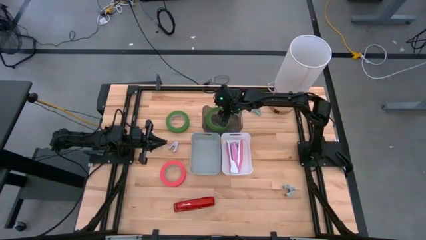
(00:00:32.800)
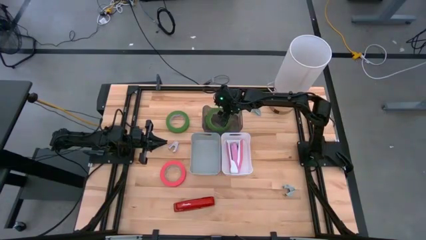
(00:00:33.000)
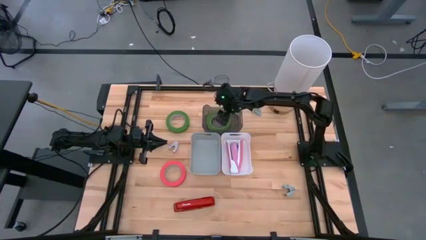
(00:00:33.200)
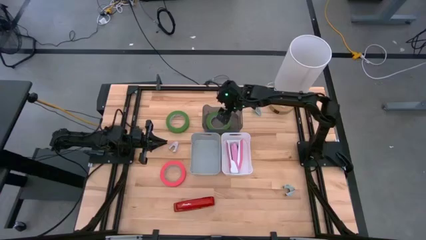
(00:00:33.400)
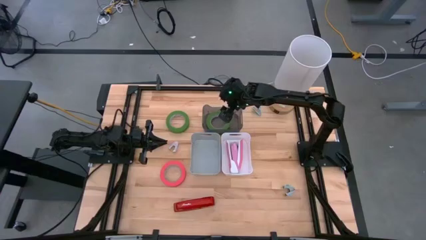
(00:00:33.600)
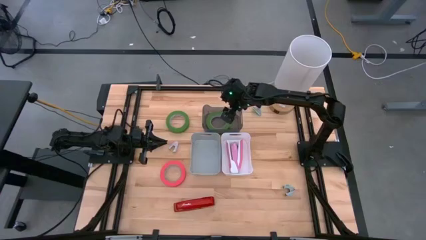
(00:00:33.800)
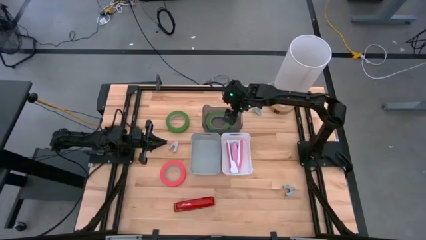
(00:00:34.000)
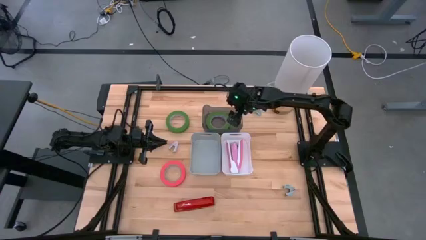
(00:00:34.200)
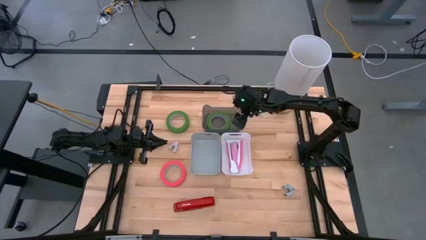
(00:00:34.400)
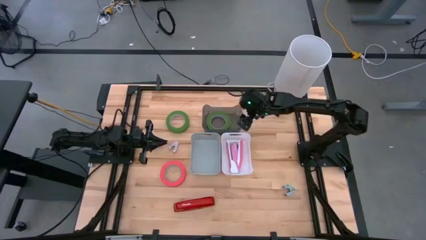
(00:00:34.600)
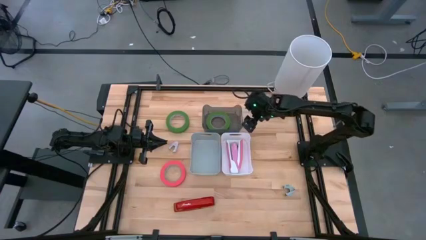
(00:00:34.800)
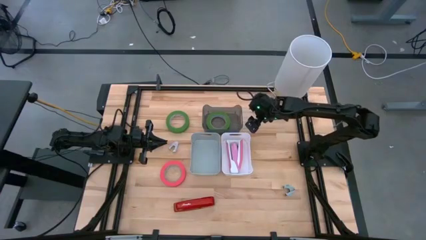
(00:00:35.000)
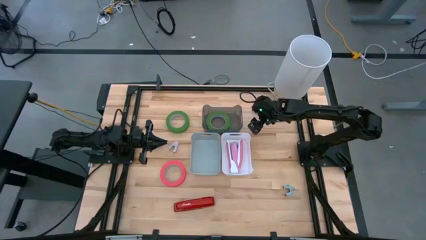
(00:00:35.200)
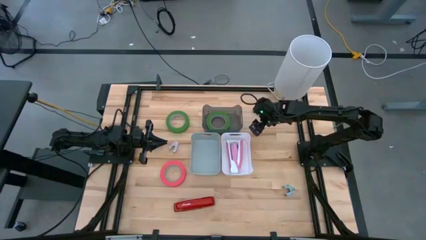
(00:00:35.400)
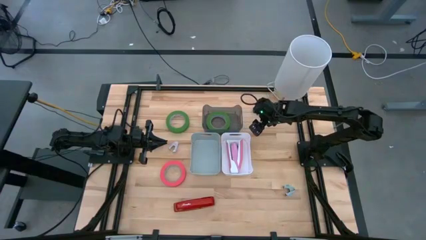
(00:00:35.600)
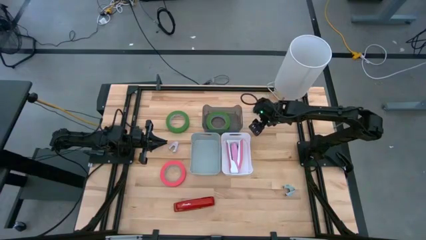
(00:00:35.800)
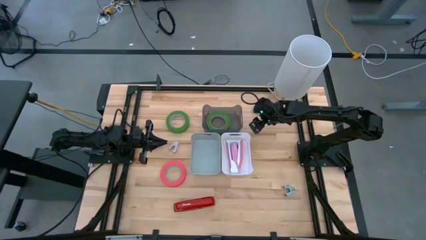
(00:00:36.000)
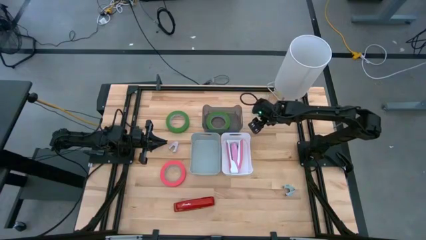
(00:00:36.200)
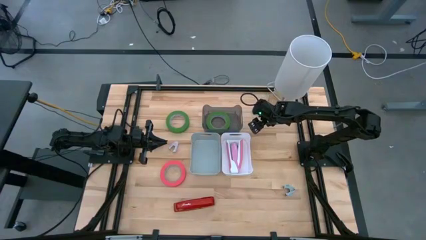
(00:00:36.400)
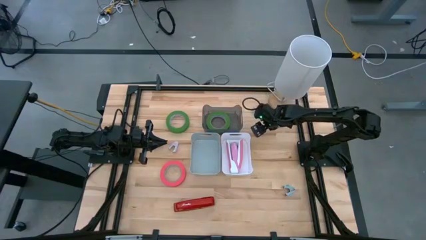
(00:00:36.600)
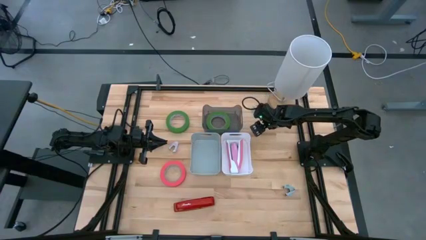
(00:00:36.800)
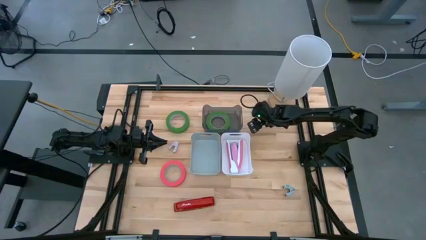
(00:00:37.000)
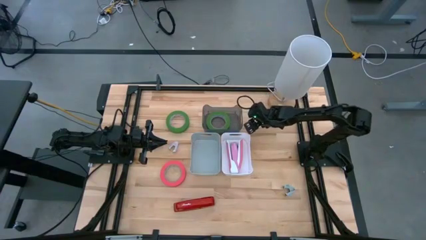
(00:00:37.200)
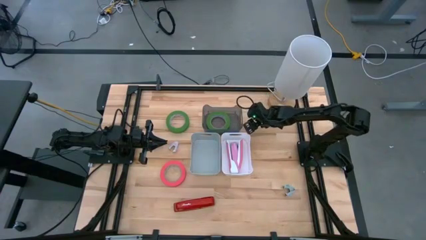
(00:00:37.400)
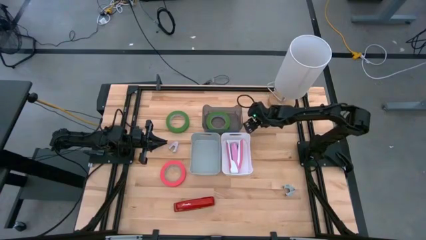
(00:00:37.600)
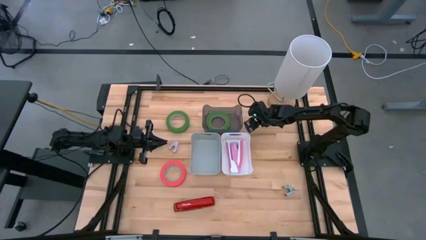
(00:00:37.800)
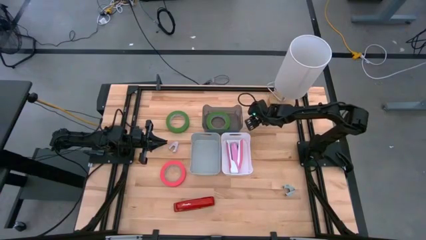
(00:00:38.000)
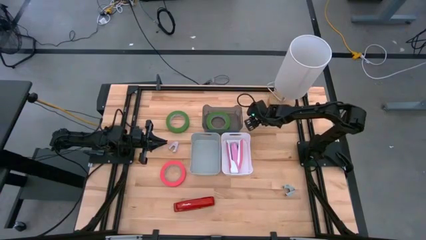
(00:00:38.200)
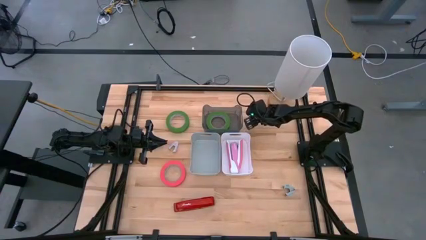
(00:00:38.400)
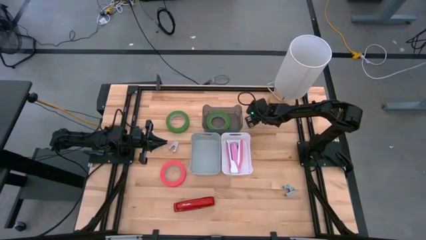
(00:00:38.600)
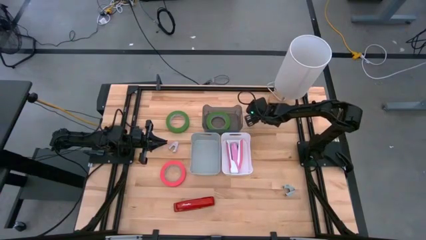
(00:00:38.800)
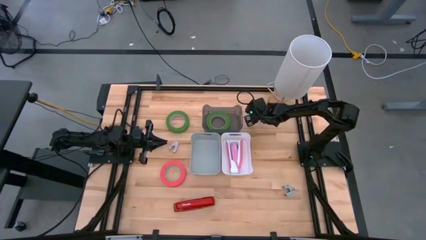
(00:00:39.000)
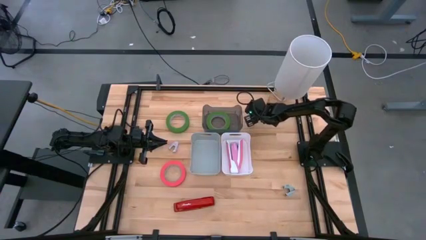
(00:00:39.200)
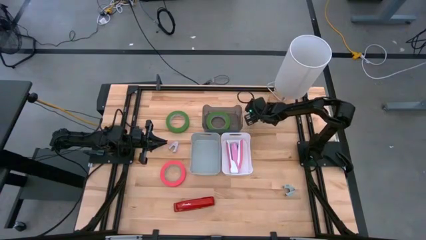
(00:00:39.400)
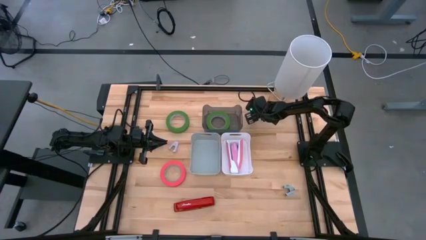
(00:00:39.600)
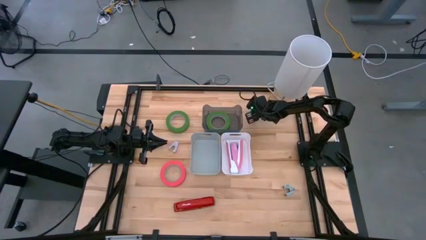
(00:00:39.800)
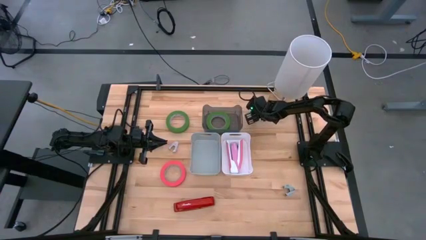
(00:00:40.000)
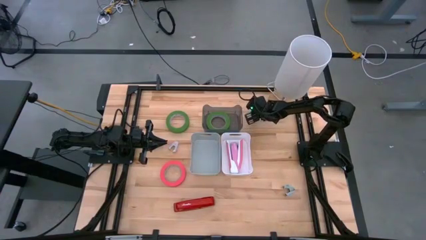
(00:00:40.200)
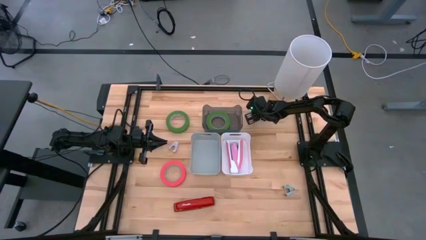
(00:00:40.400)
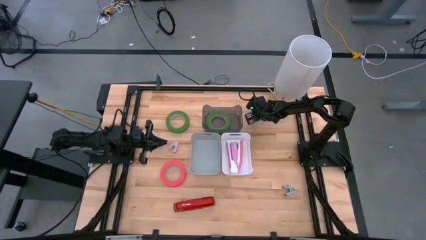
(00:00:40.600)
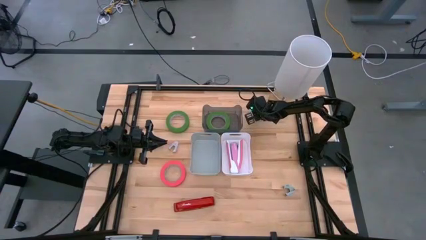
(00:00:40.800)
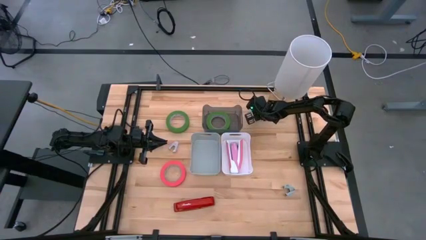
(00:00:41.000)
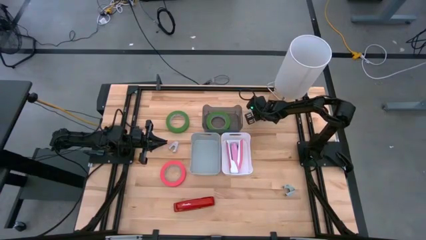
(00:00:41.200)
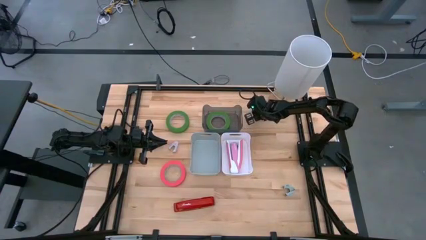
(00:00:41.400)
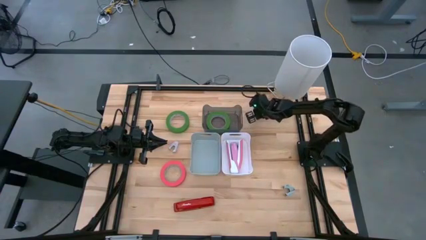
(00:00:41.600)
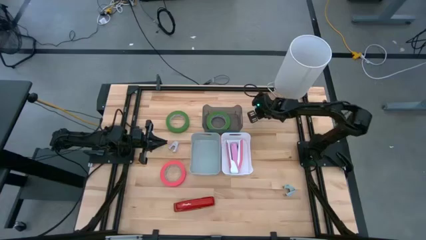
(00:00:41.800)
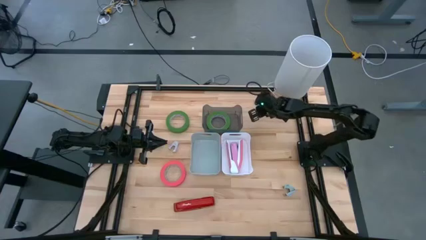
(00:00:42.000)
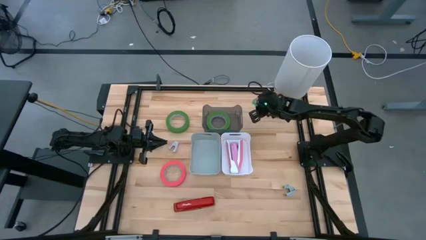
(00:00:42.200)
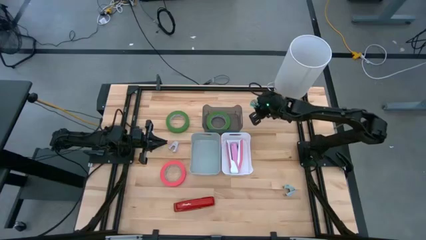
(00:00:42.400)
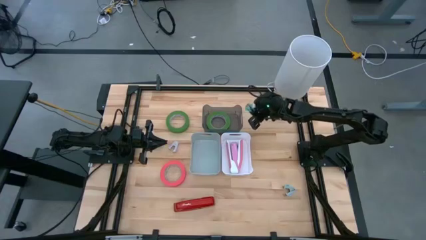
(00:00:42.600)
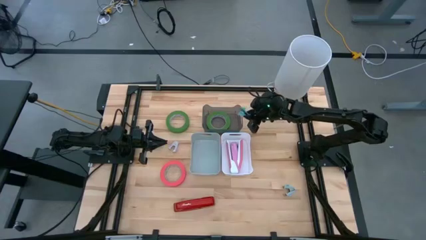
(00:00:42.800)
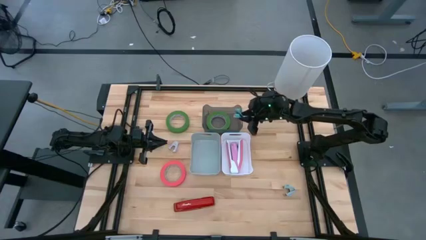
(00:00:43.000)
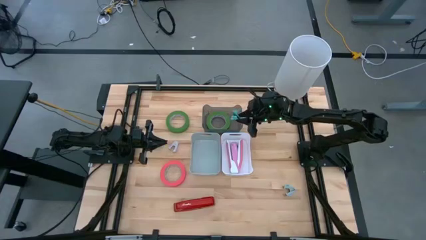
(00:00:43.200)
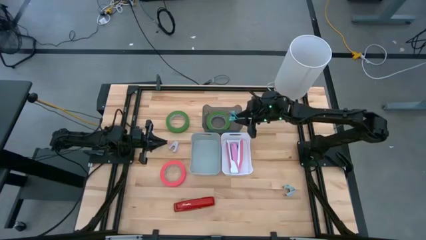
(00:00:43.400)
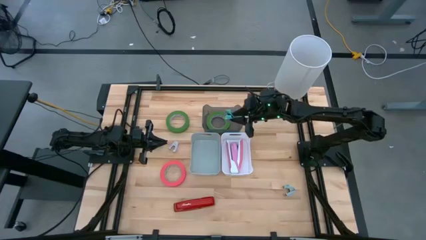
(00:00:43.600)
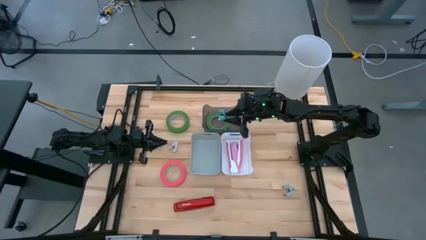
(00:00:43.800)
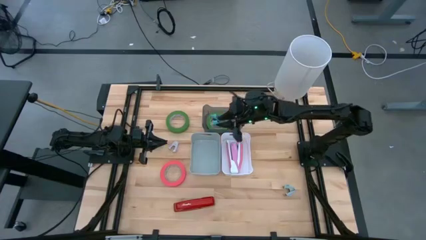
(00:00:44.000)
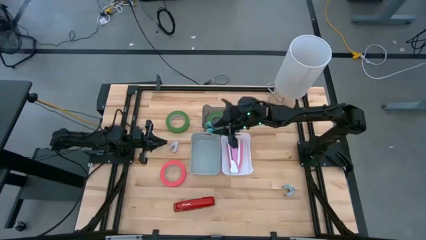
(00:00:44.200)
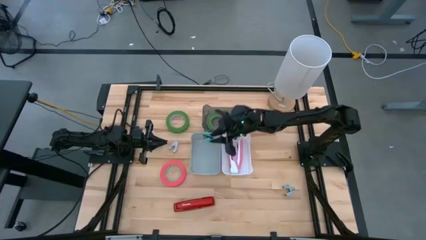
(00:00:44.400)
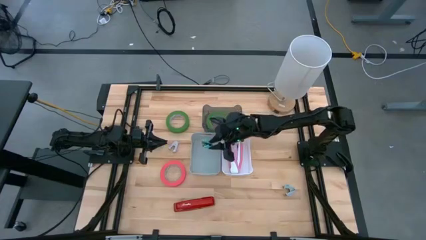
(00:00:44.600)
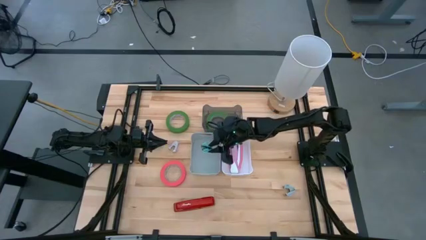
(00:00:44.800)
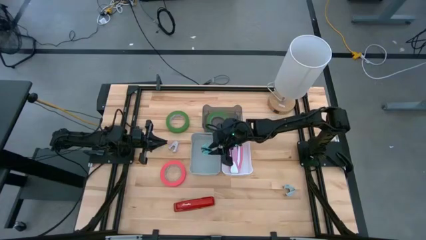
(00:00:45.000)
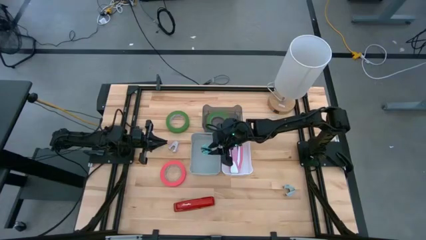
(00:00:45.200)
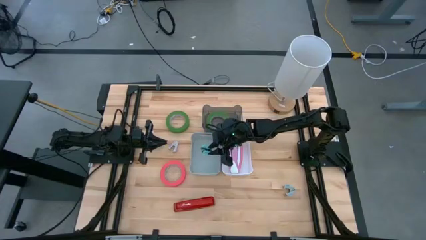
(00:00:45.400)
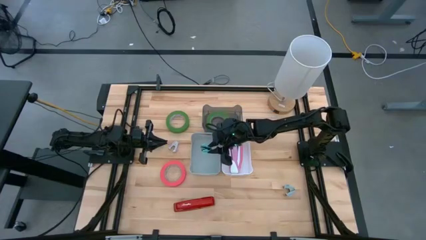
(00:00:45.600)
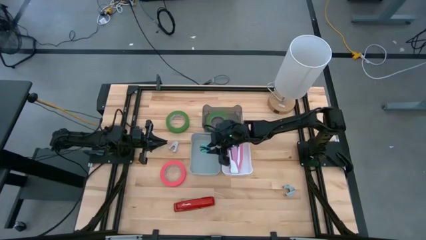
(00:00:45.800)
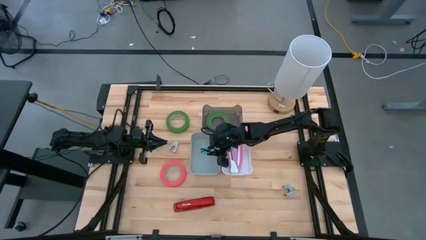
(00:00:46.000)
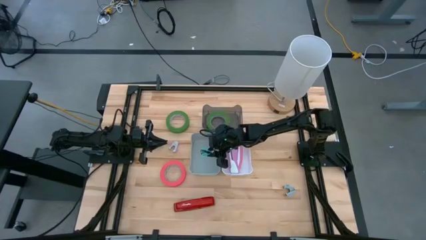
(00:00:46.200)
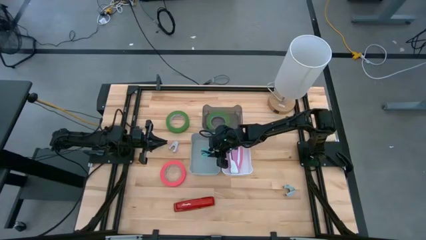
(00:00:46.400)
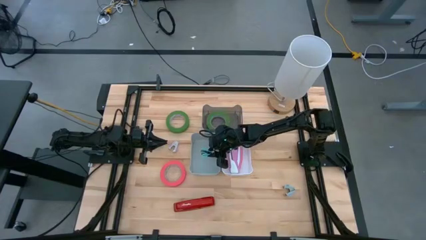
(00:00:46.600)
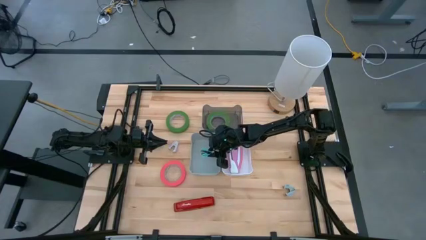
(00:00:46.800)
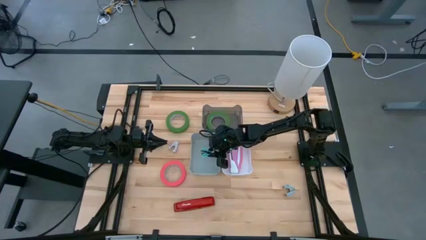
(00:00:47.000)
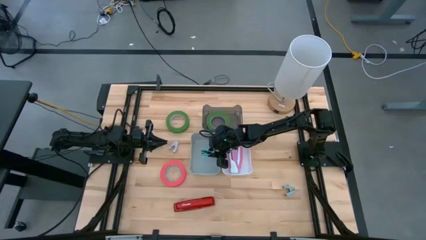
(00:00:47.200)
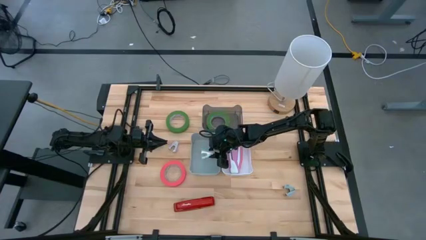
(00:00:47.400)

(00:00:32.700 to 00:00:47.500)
Task: Pick and place Stapler, Stapler remover, tape
Put the light blue staple remover in the gray bin
